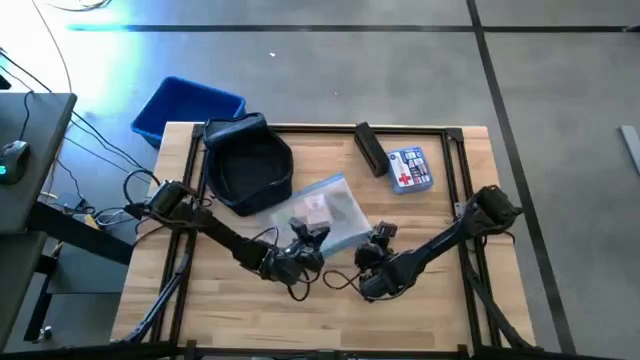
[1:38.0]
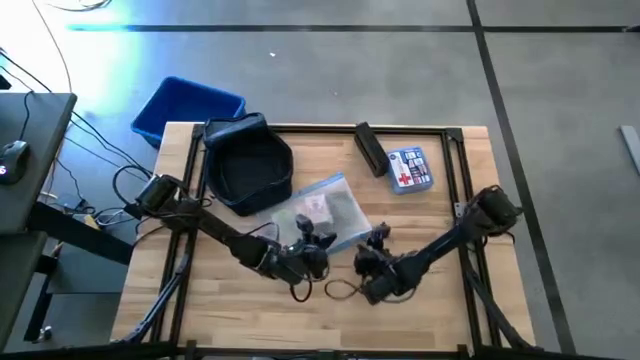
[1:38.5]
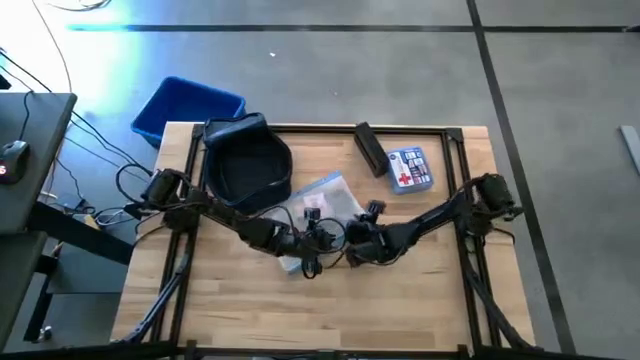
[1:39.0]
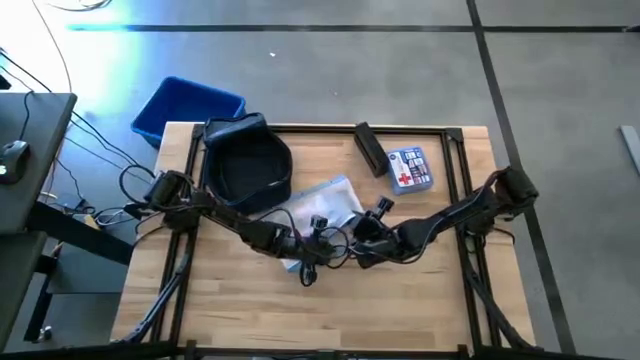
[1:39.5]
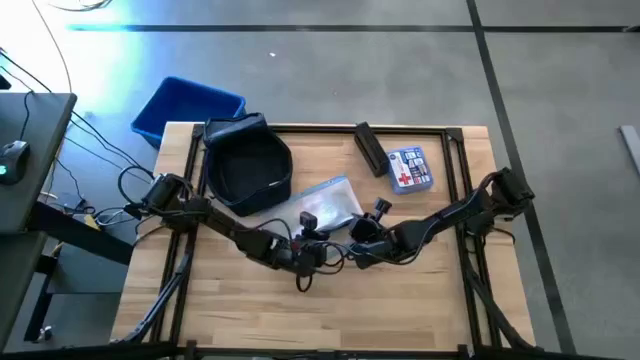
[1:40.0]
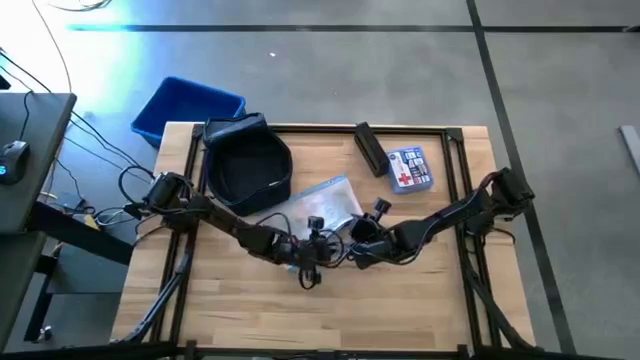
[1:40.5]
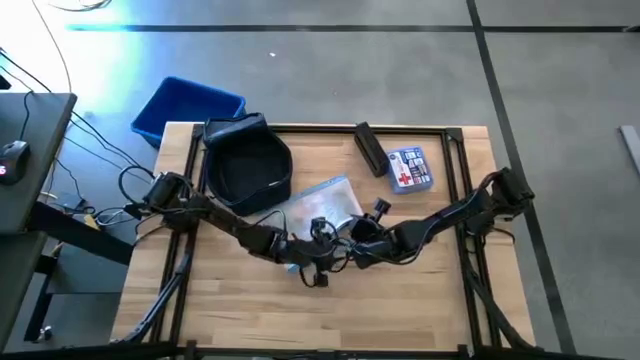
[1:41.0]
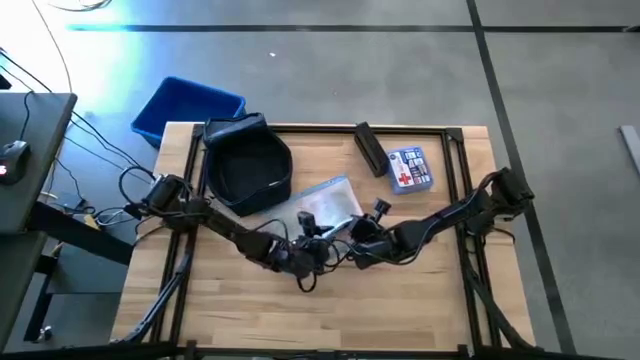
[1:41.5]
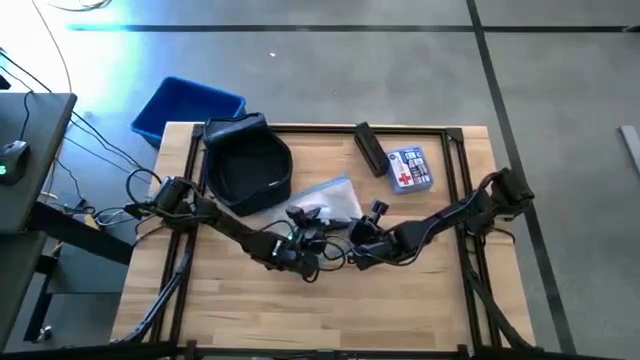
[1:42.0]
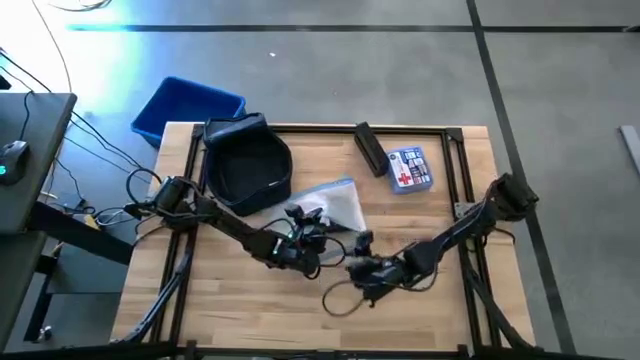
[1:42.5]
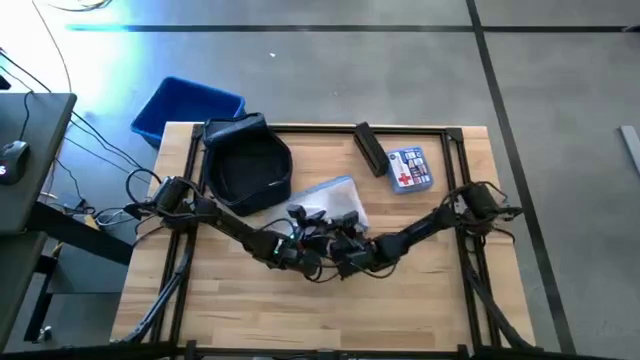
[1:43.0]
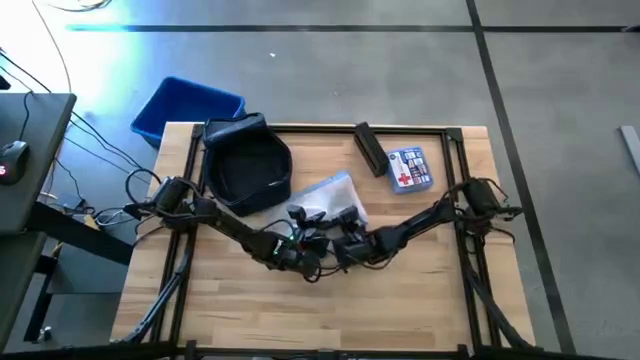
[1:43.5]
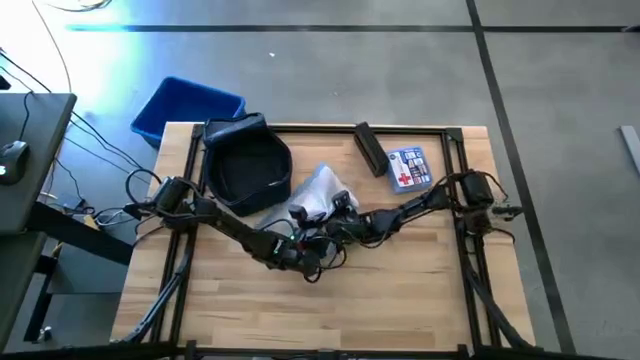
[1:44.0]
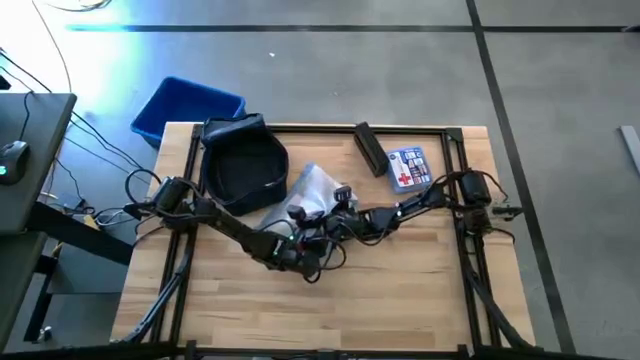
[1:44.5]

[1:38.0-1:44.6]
Task: Unpack backpack
Remove the calculator from the white zip bag

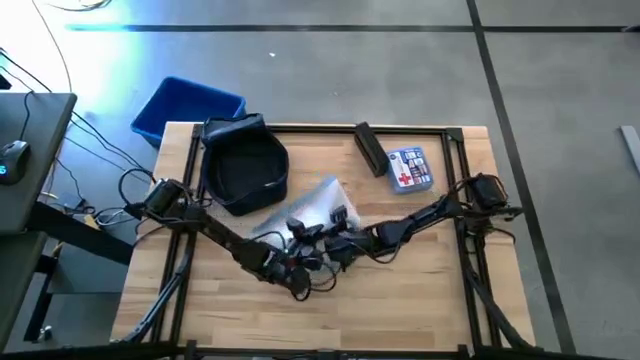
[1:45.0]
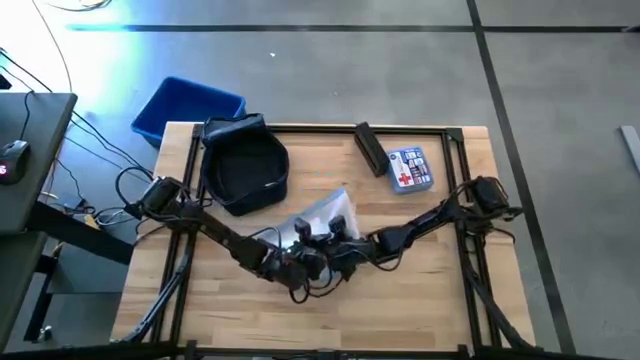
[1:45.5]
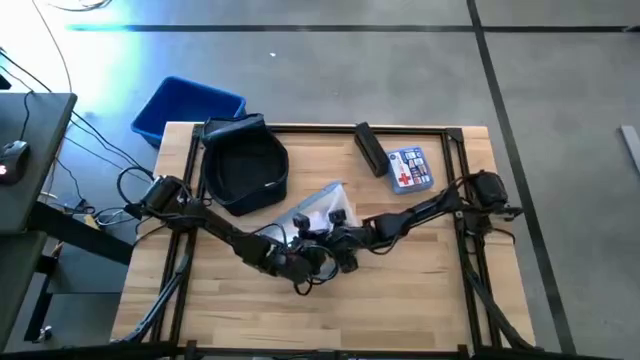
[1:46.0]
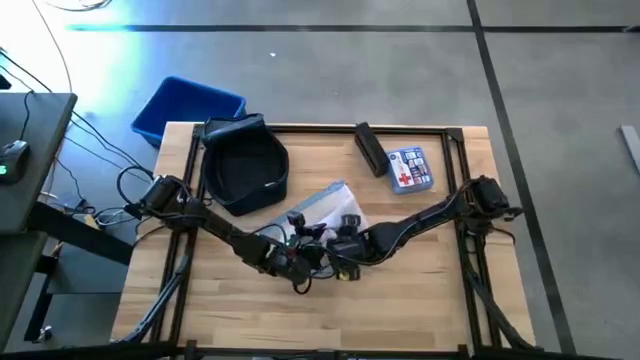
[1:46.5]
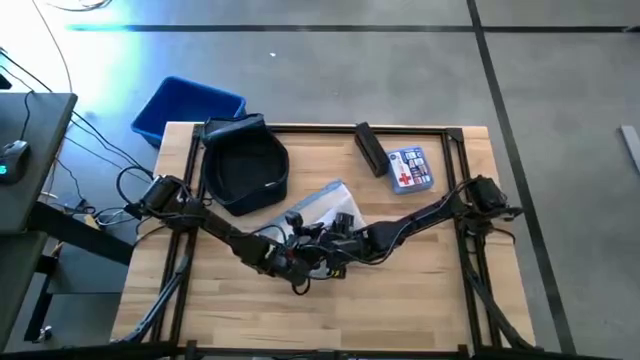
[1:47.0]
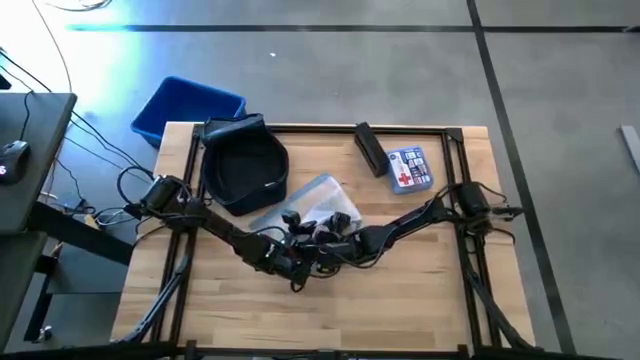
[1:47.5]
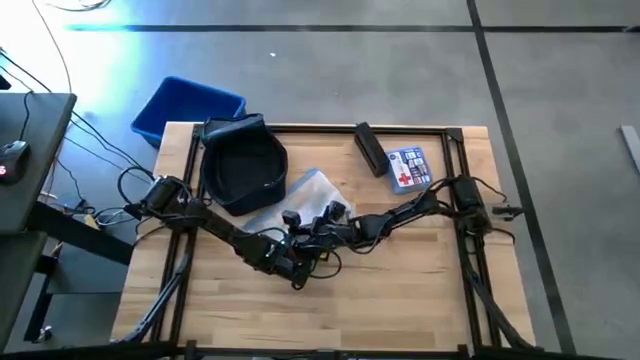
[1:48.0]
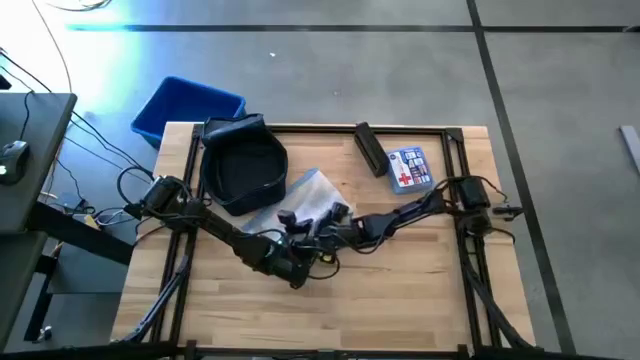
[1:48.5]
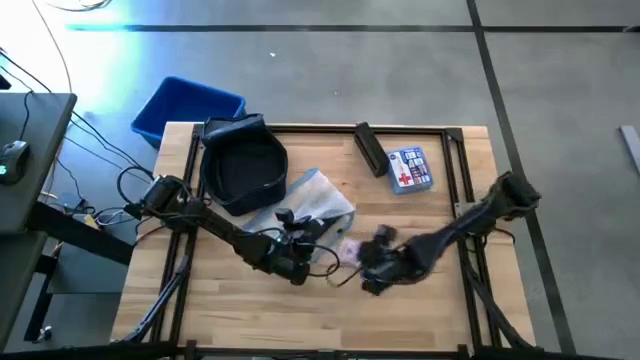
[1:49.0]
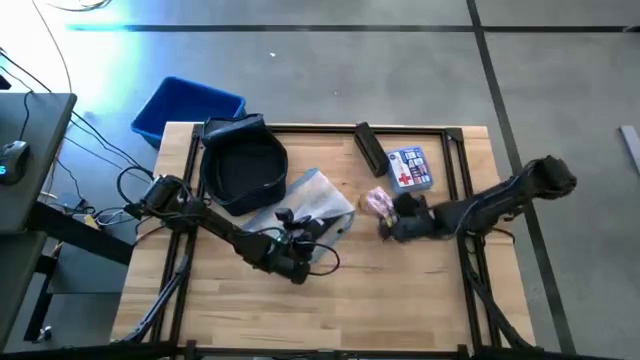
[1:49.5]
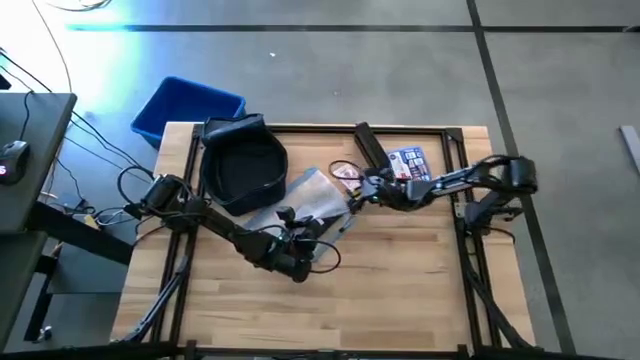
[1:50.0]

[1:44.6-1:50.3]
Remove the white playing card box from the white zip bag

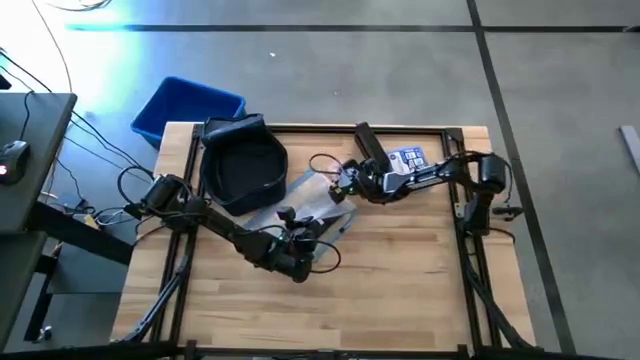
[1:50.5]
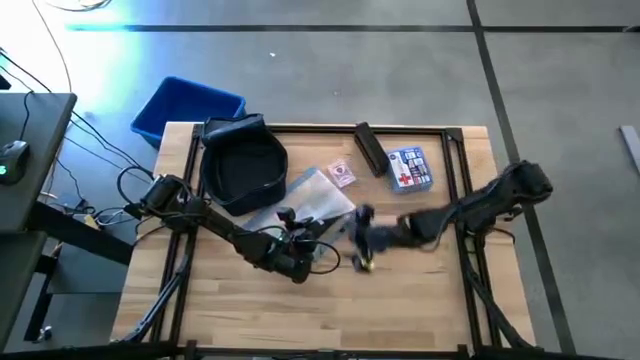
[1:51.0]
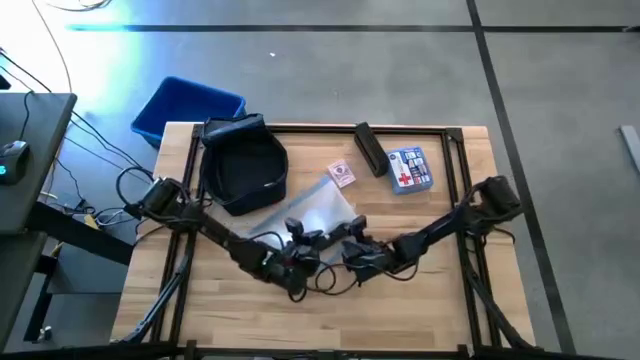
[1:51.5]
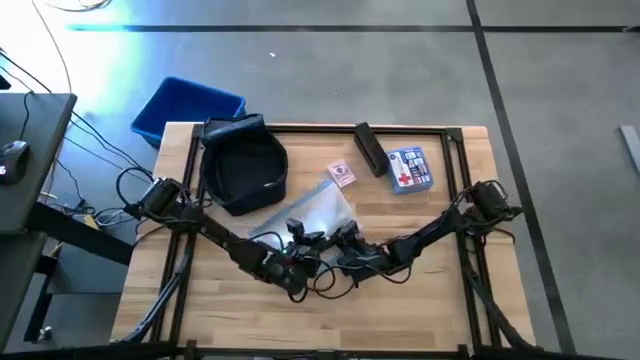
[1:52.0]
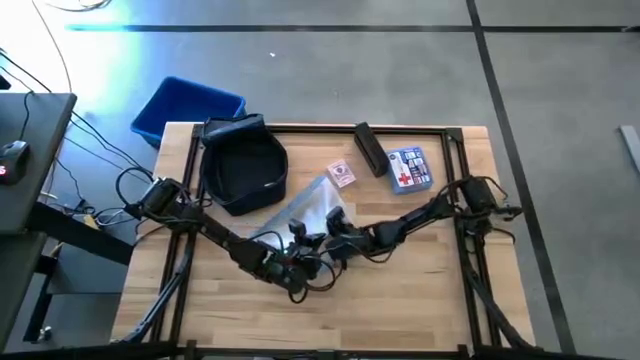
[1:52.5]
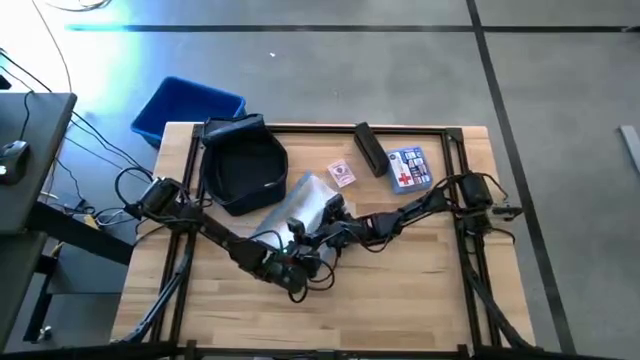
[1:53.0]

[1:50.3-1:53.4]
Remove the black calculator from the white zip bag

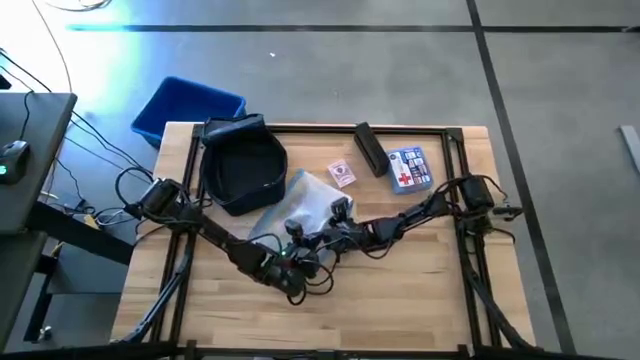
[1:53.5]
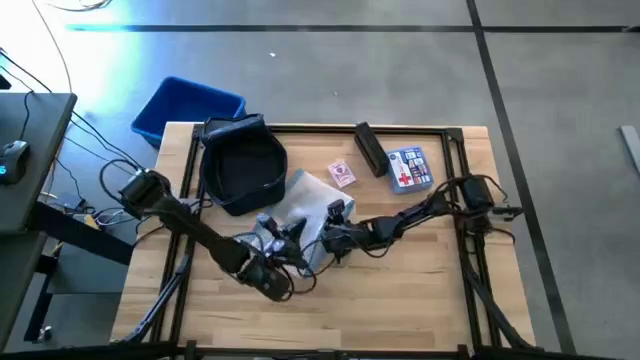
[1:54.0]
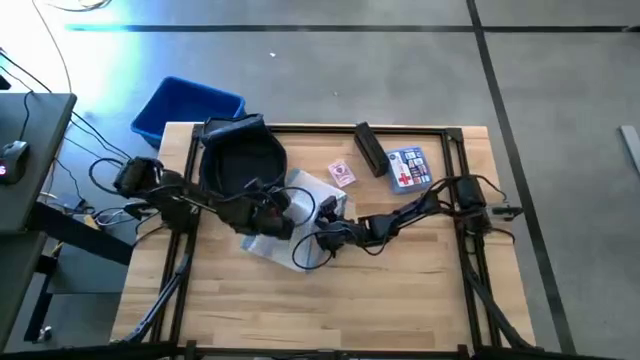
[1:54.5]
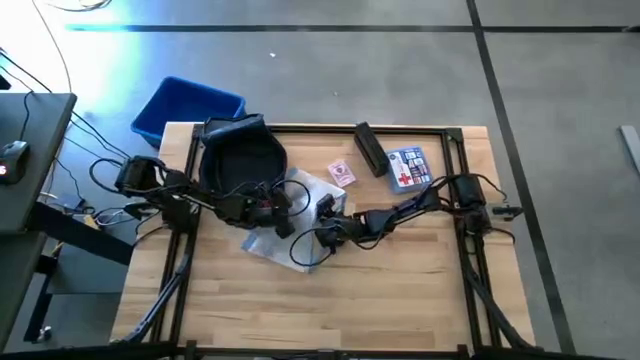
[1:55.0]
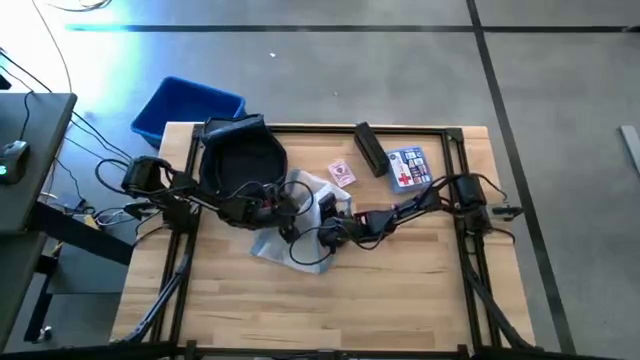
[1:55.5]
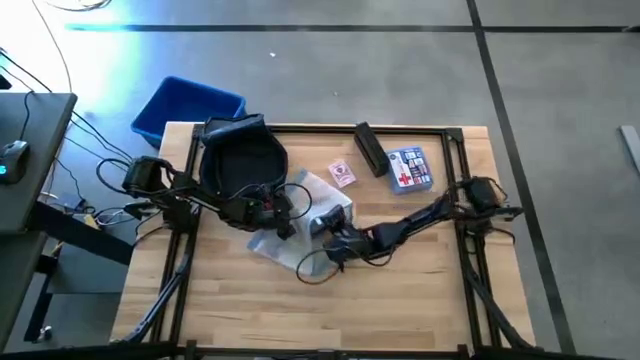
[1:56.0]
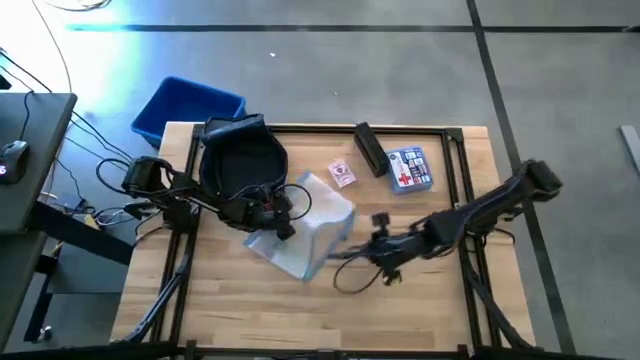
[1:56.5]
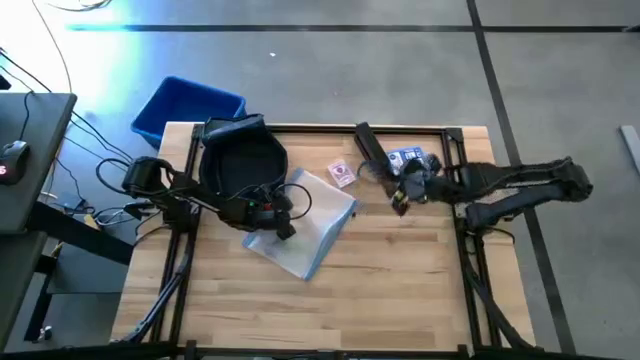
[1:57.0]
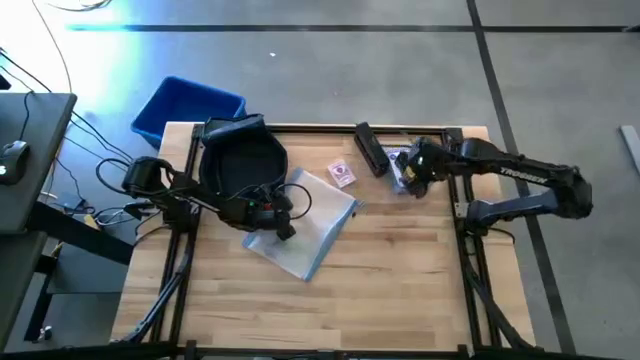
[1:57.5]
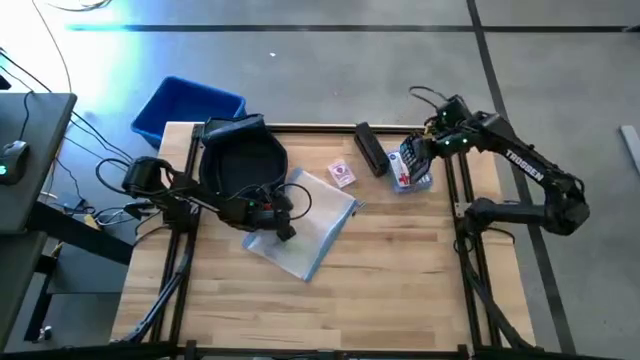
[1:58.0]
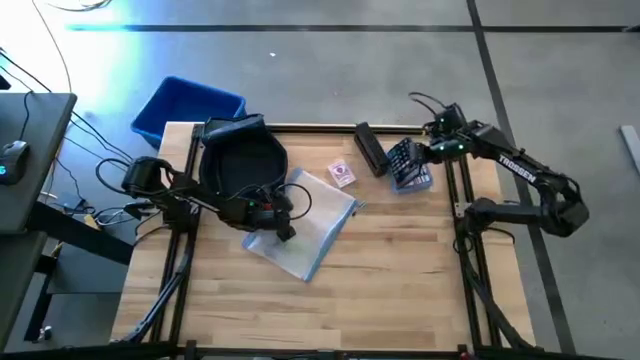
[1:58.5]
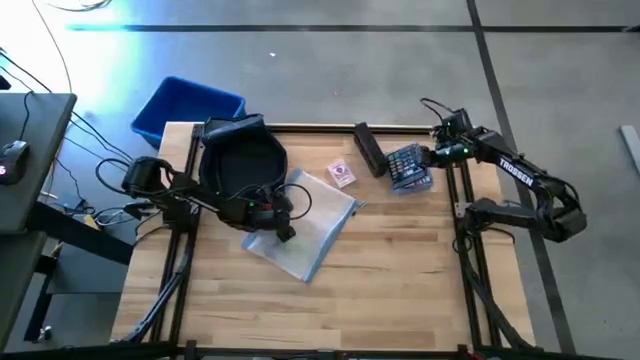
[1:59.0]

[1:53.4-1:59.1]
Remove the black calculator from the white zip bag

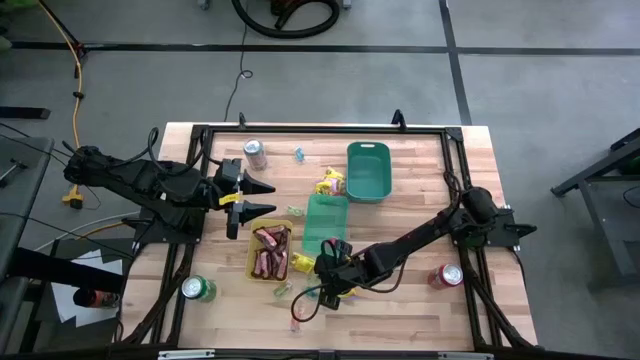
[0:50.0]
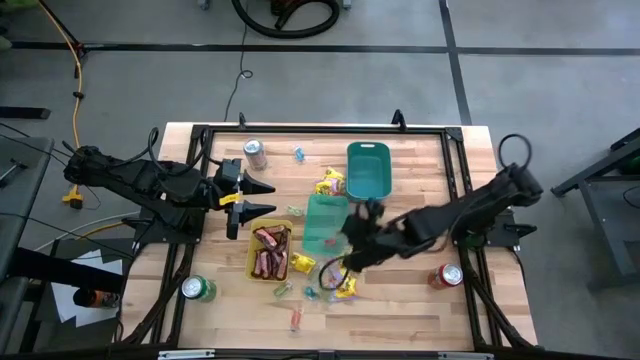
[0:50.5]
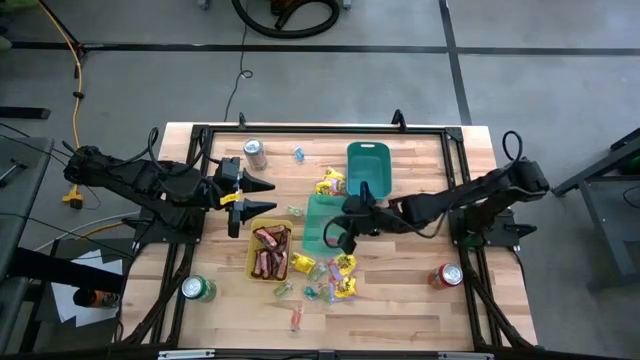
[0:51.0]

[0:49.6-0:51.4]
Task: Sort candy
Put the green gummy into the light blue bin
